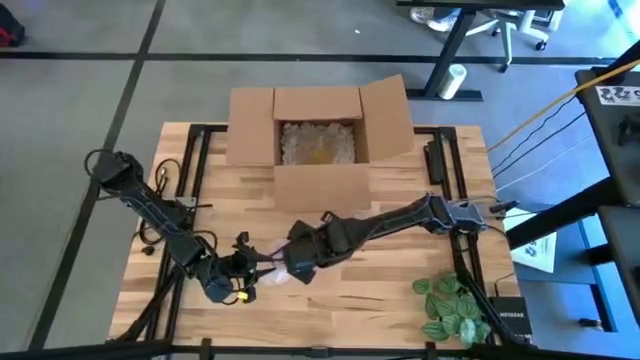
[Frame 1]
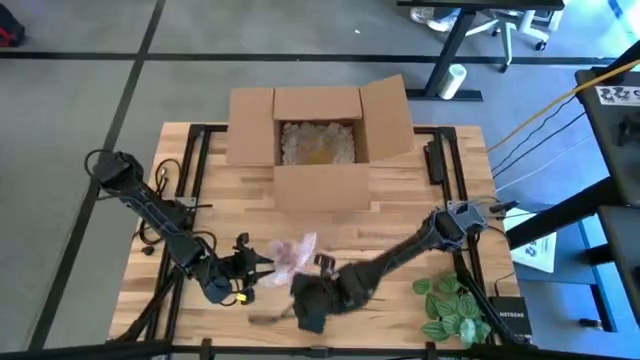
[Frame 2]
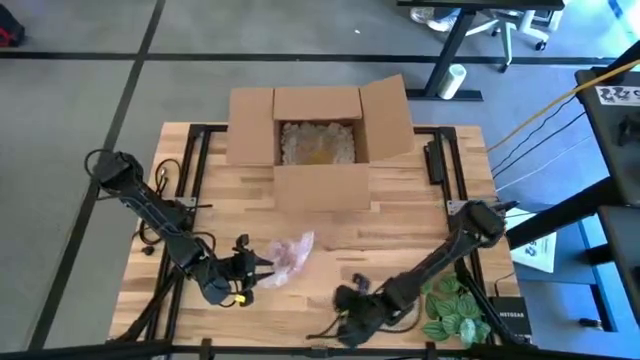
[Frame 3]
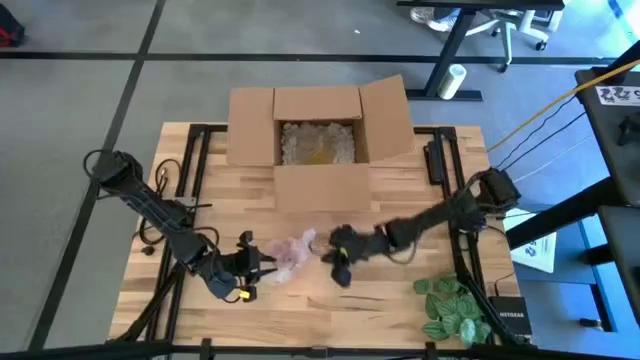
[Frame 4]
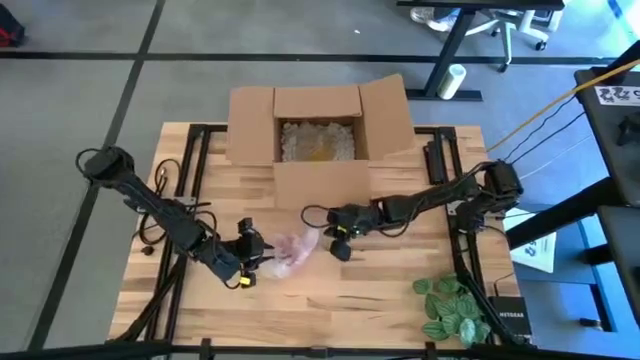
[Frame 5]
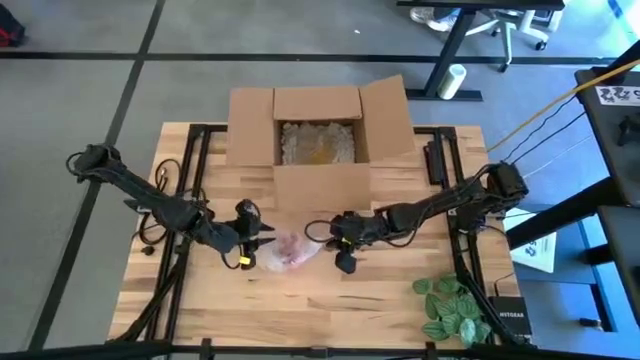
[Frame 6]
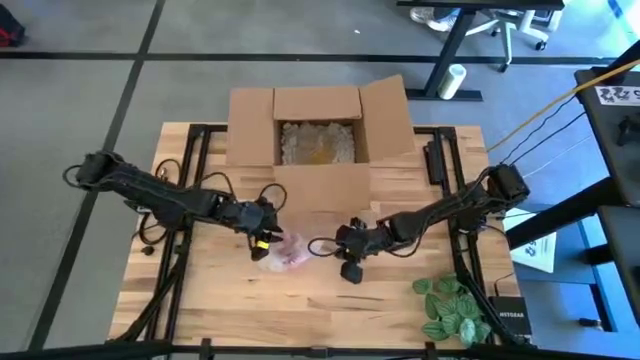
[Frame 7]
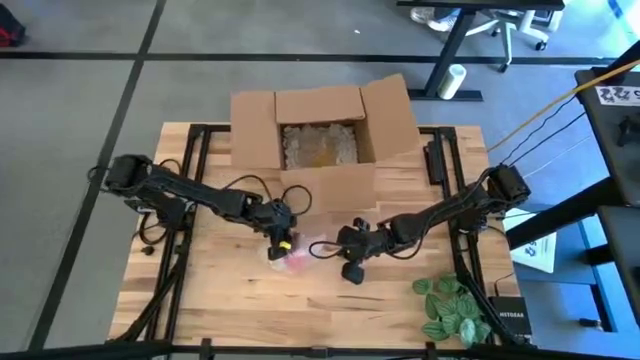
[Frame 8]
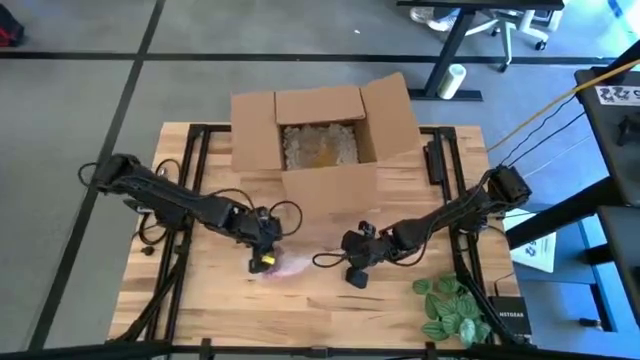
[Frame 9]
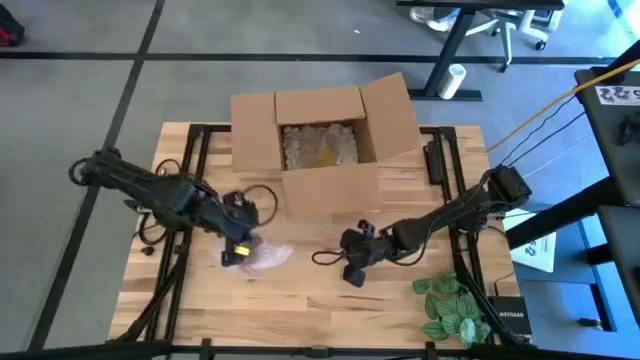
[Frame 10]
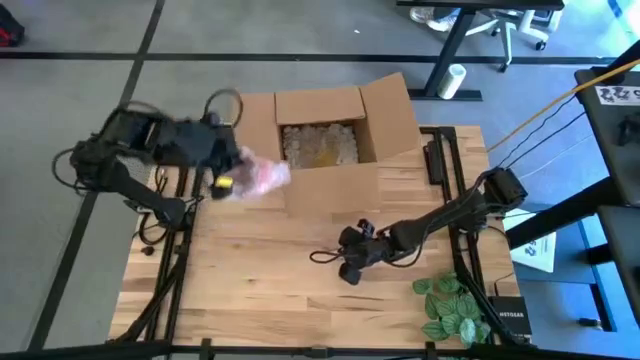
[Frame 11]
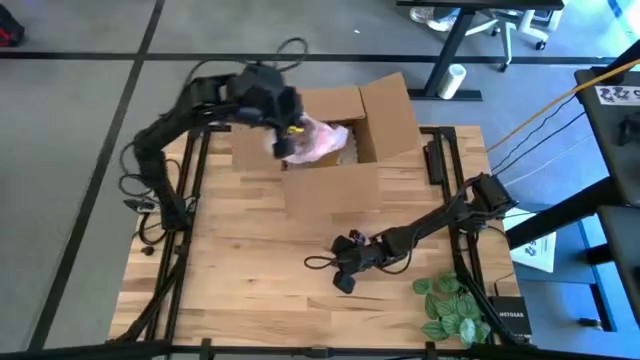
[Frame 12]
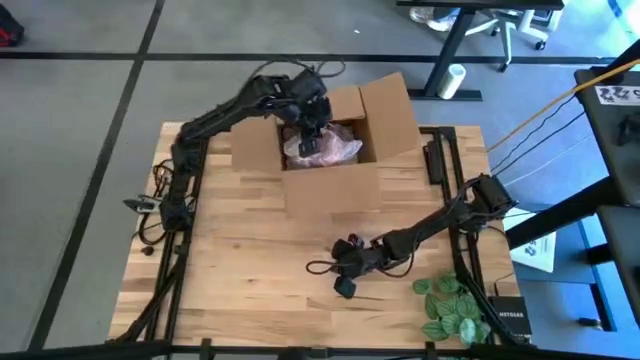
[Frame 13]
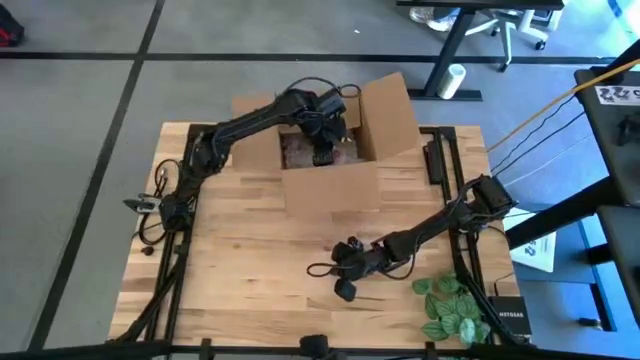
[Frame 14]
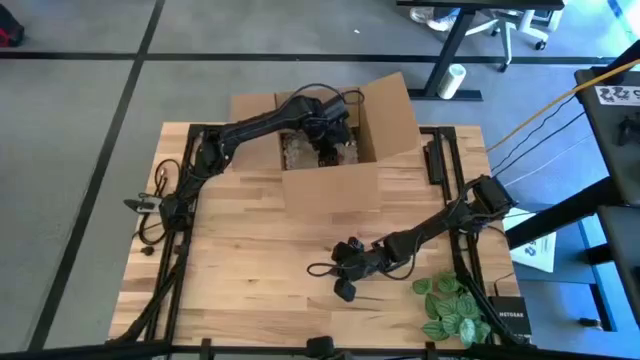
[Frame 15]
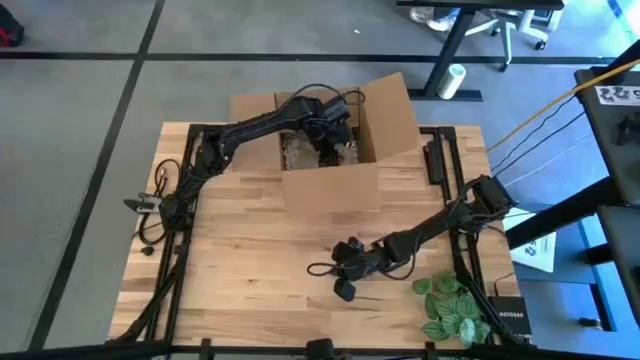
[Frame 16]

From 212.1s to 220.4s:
Task: wrap mug
Put the wrapped red mug into the box

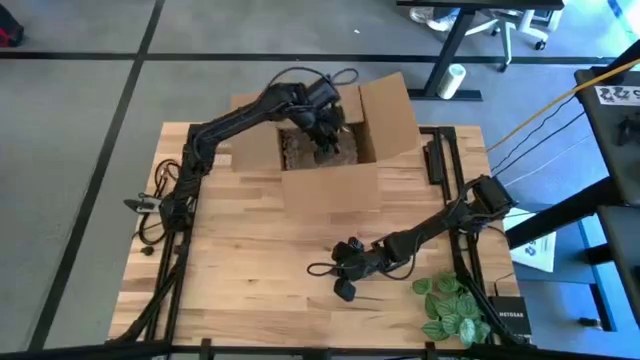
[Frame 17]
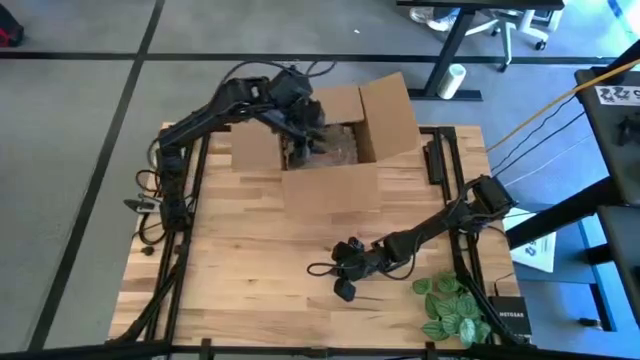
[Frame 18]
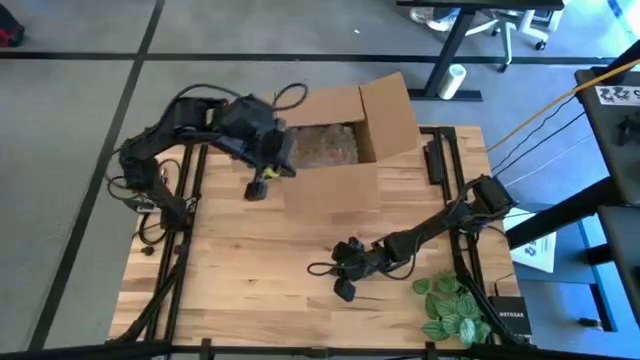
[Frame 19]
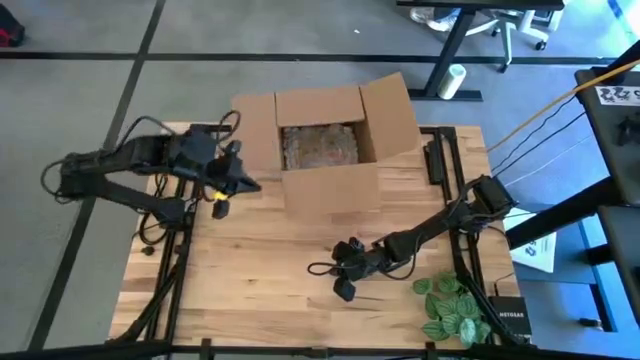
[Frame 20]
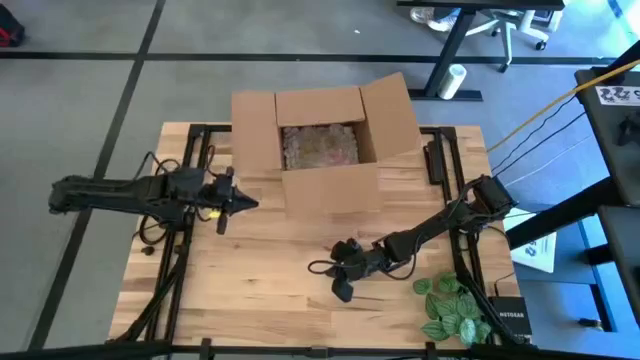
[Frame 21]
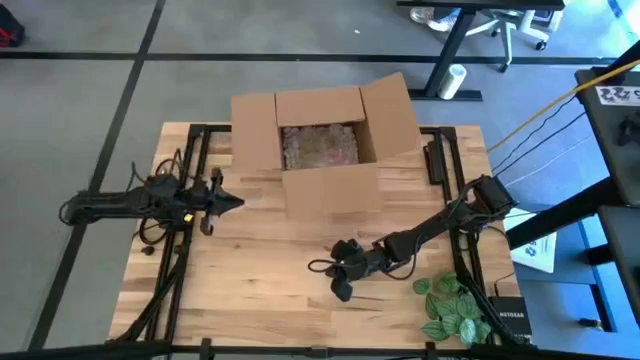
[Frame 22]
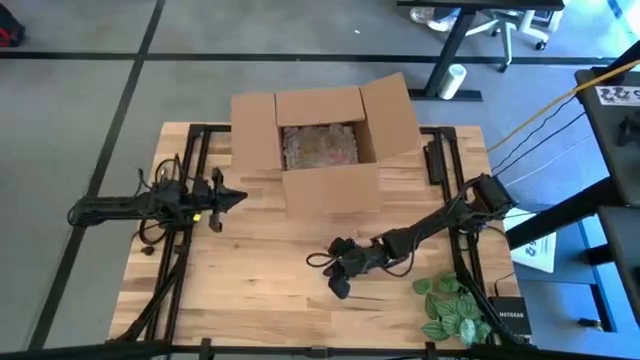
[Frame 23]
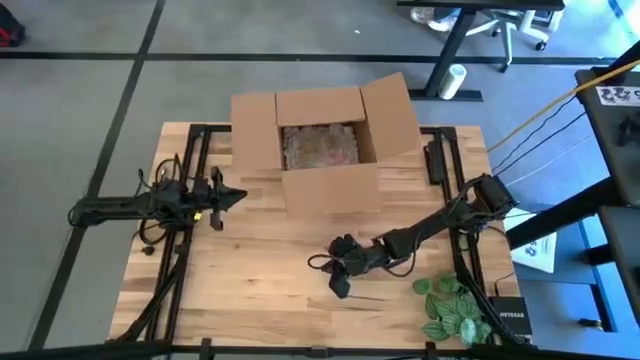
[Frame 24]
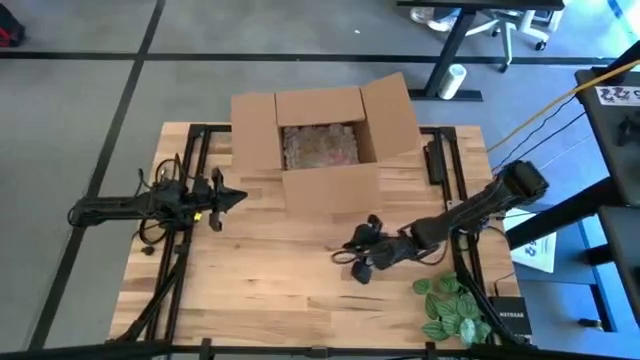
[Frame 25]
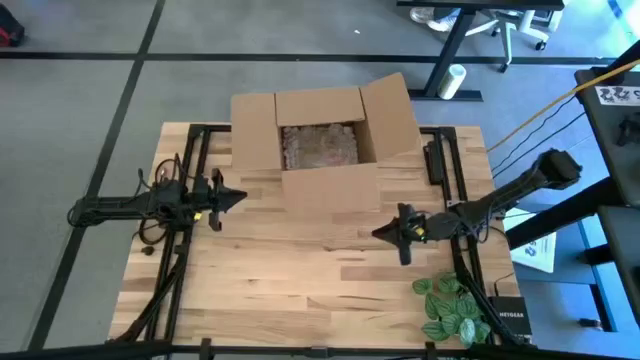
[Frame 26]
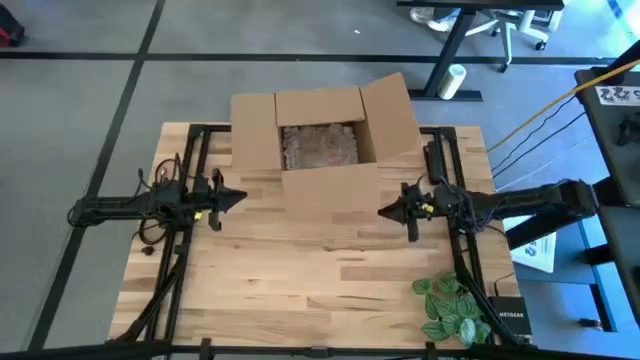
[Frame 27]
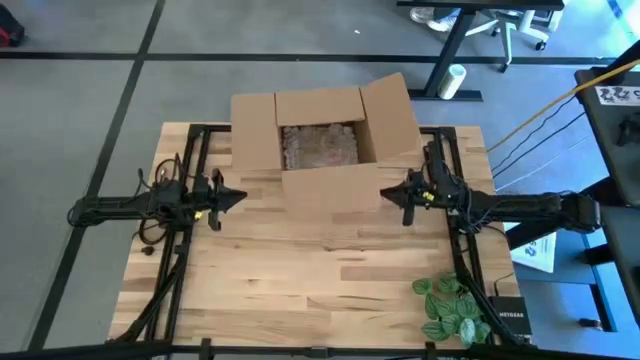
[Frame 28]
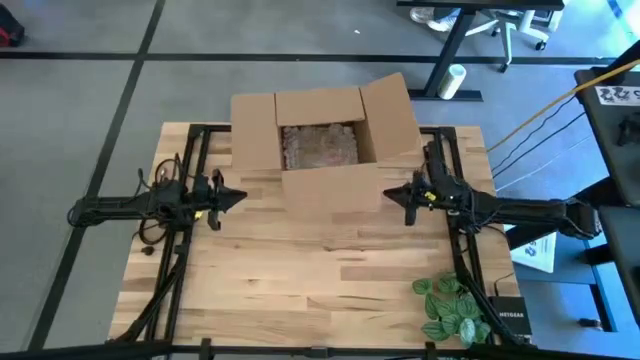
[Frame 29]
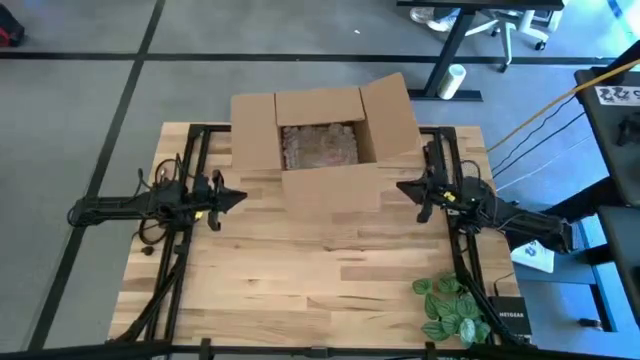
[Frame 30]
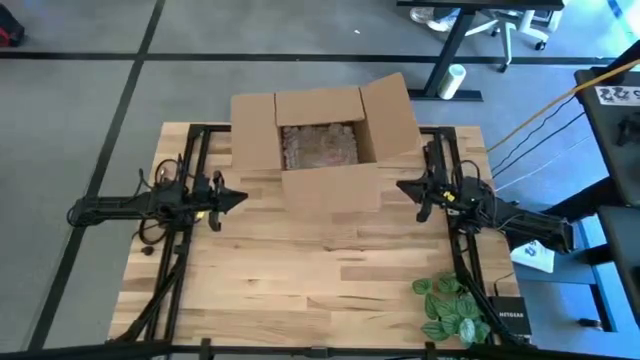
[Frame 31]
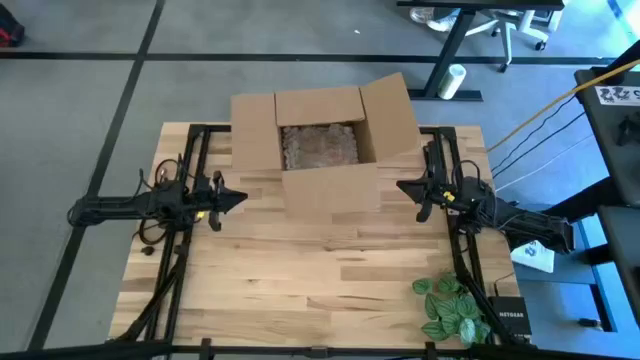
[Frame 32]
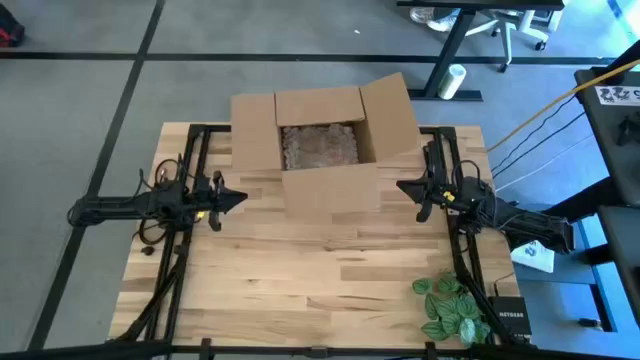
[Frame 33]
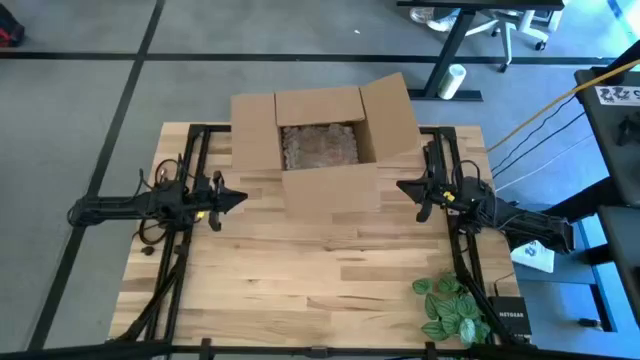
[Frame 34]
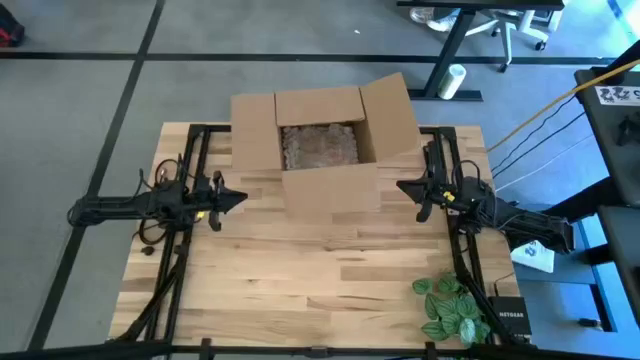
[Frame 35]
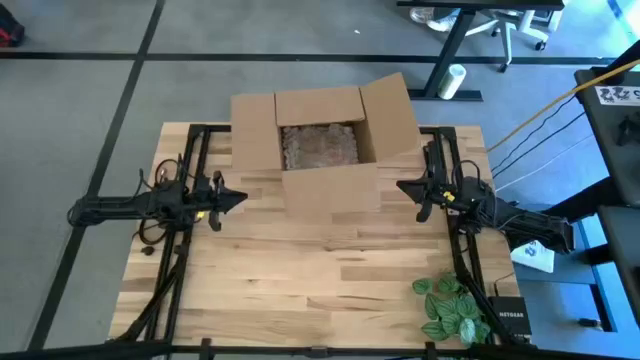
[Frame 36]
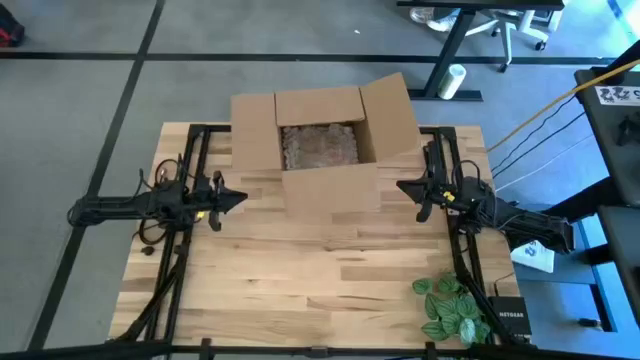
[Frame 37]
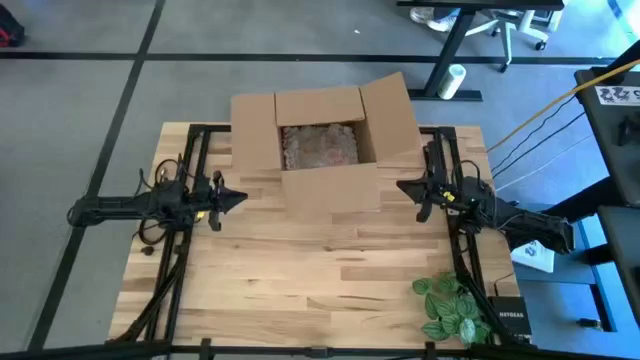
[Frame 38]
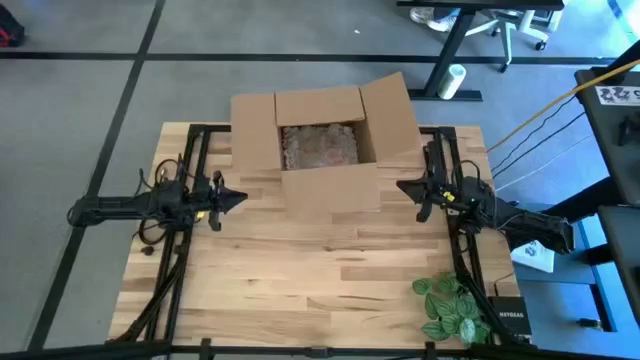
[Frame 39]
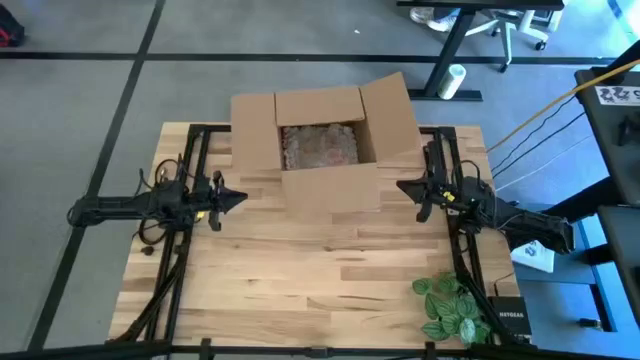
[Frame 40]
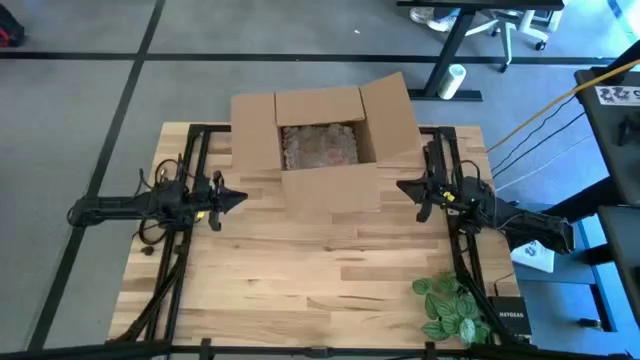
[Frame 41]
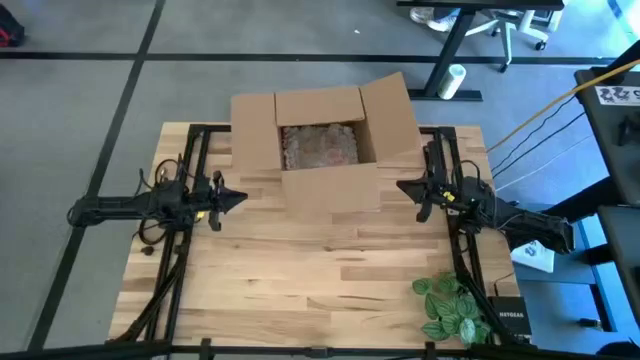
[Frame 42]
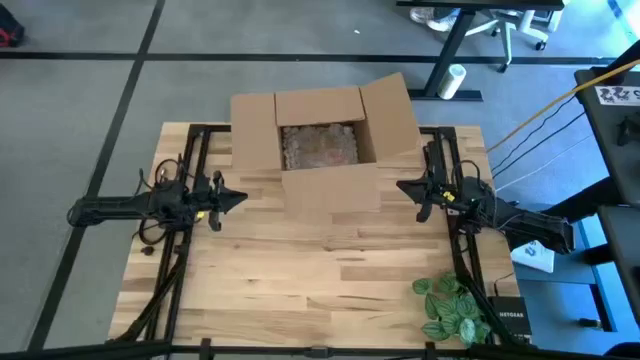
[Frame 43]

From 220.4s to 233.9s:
Return to Home Position
